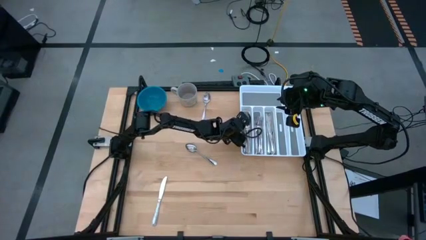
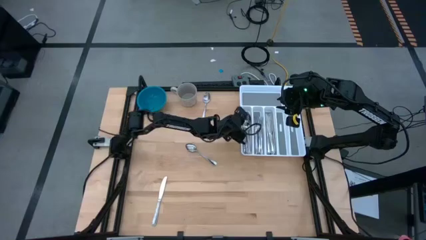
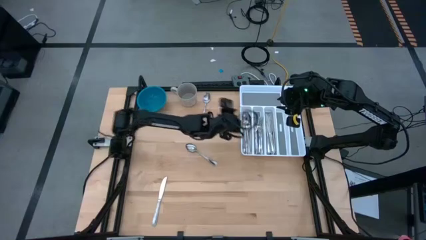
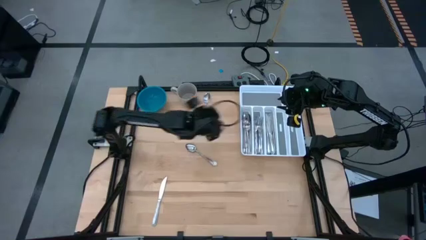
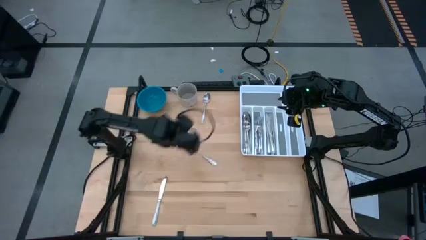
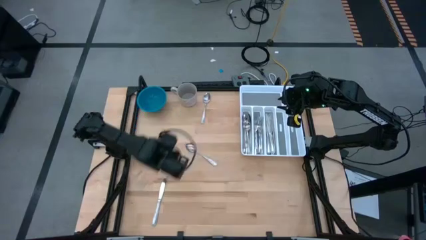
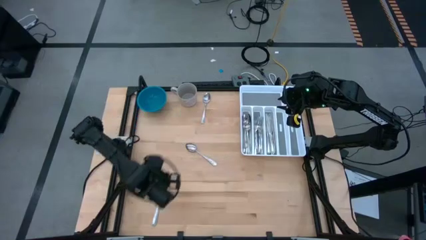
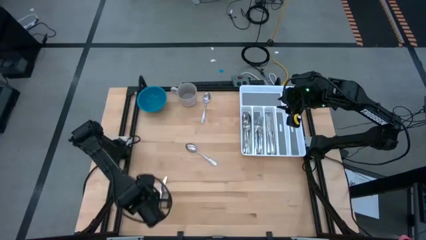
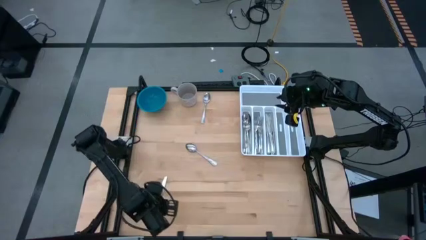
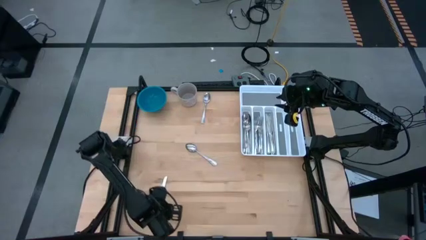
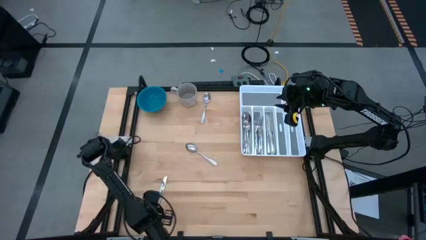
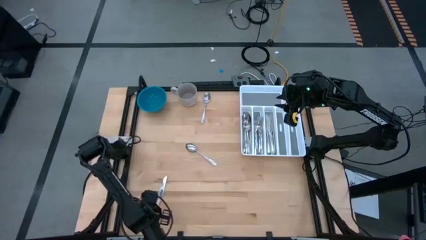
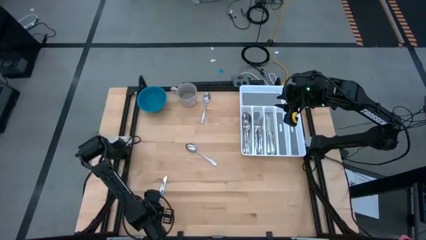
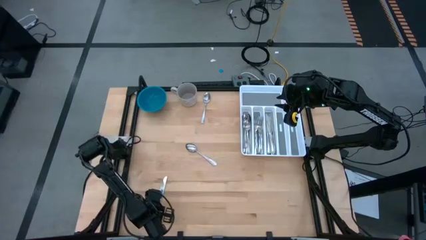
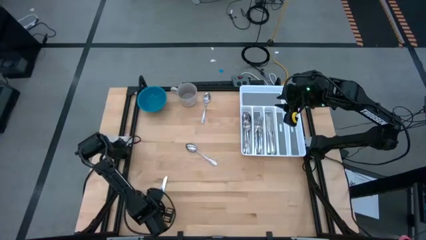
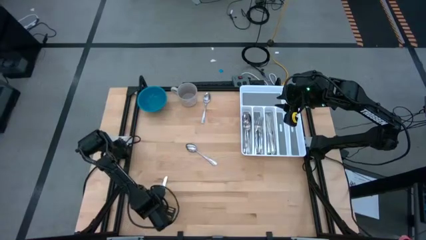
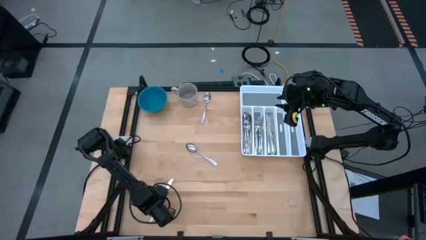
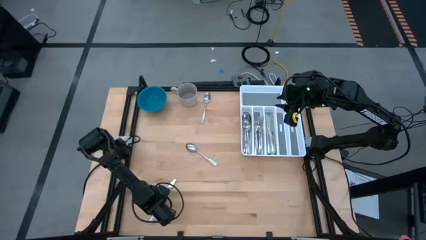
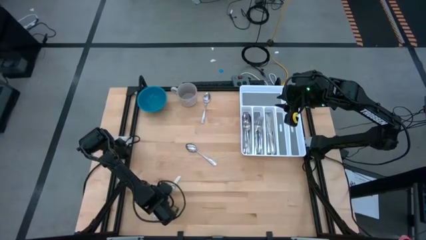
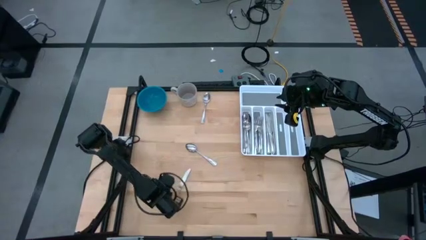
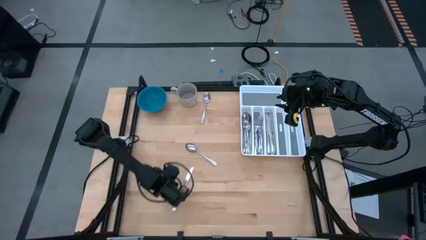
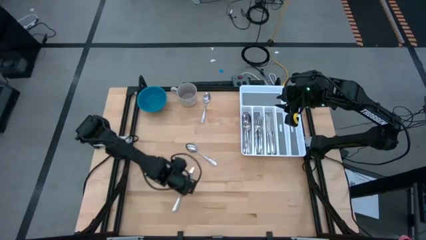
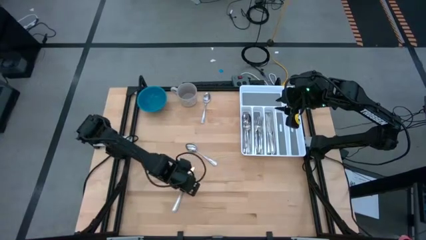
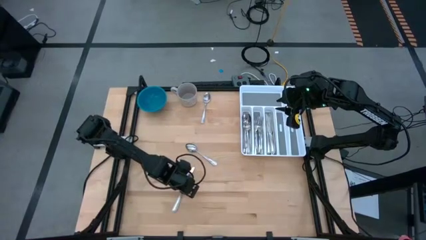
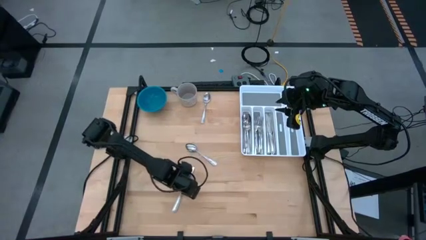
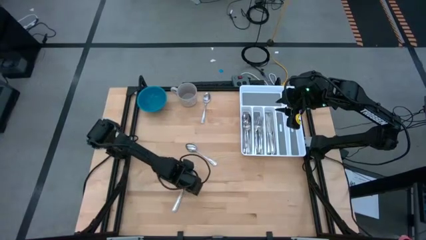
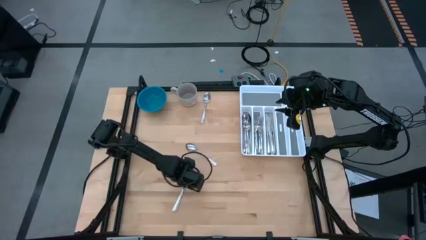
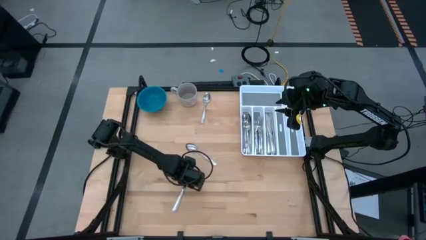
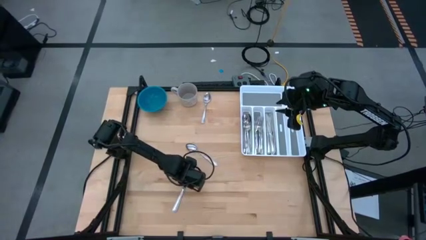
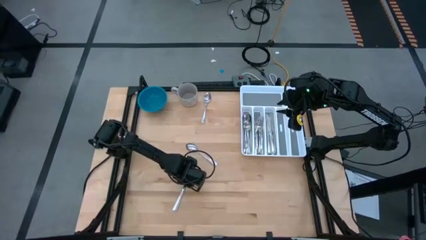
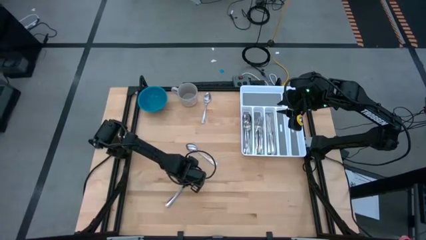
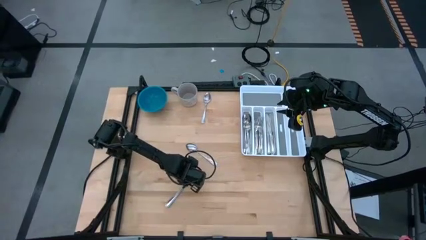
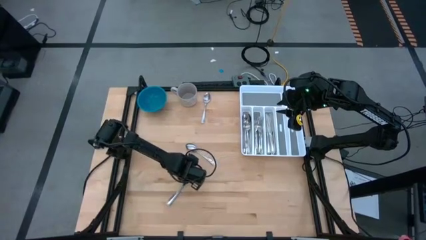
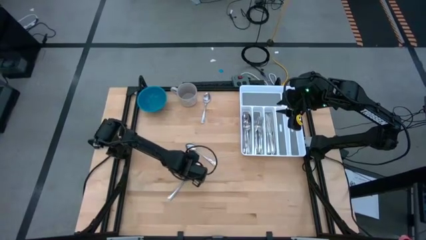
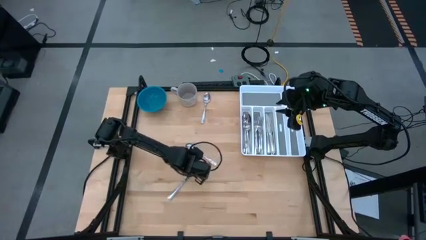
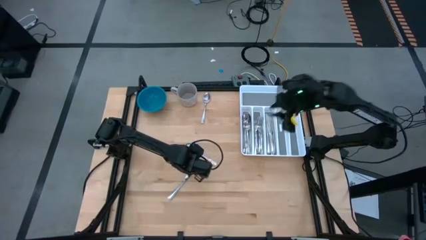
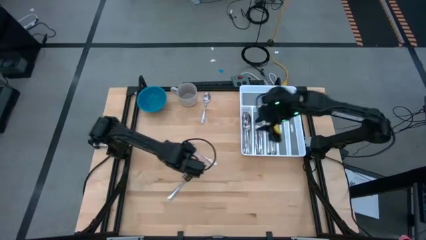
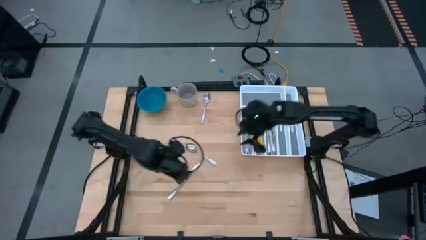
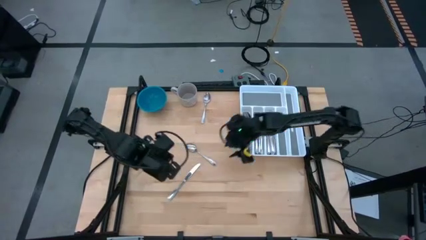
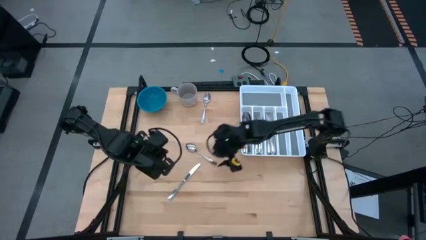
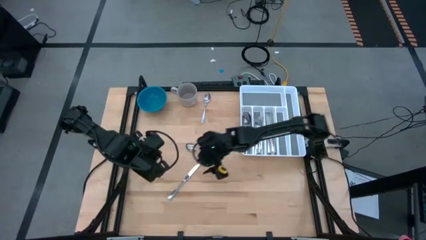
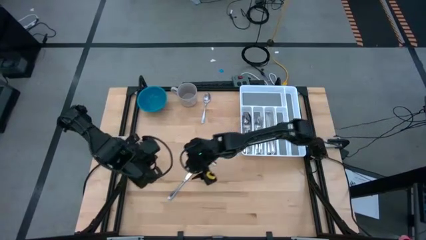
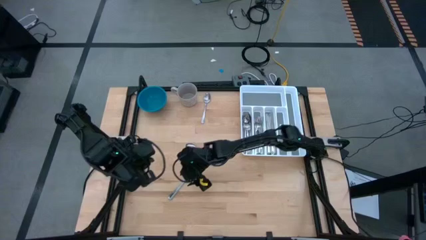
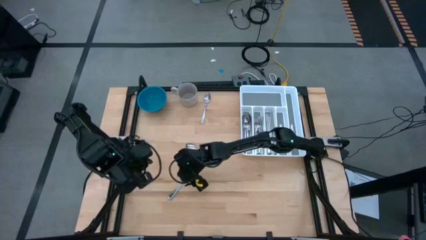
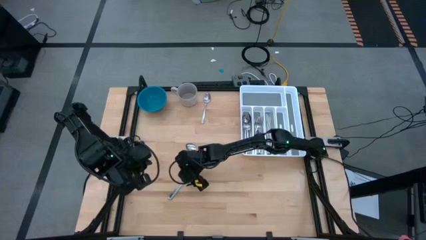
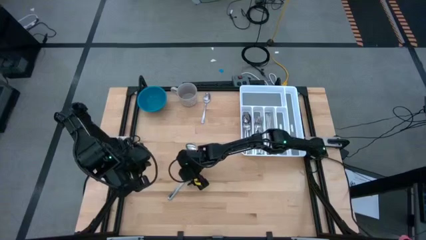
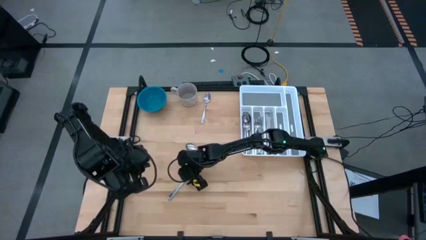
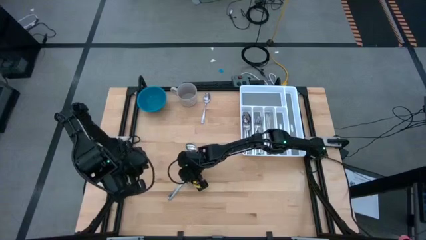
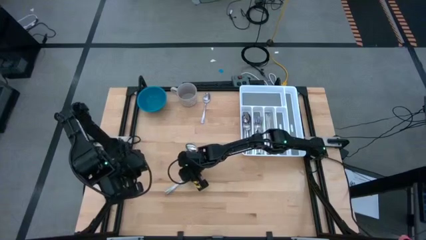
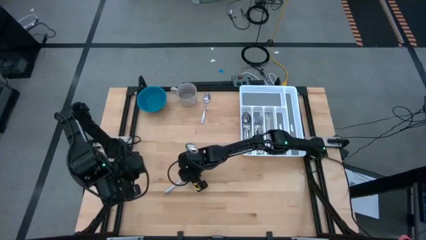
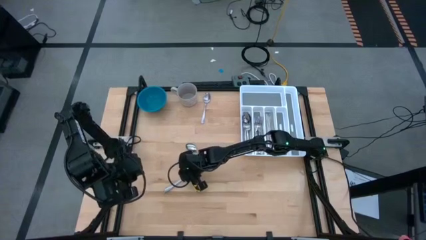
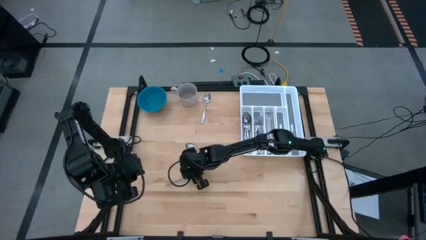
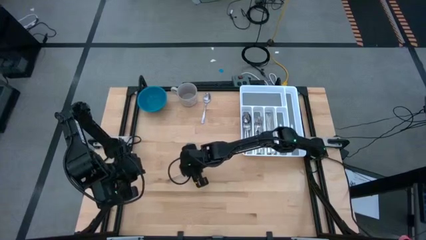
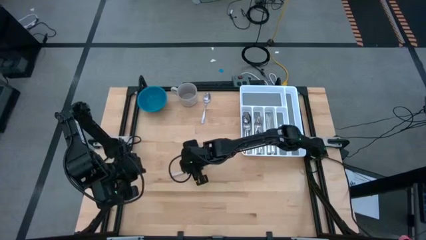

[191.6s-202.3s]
Task: Sort silverware
Put the table knife in the silverware tray

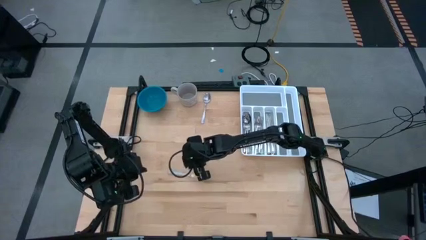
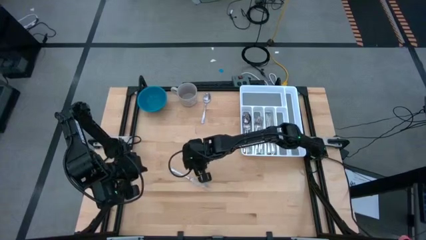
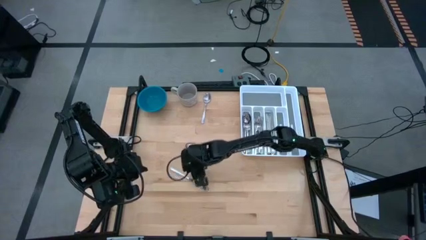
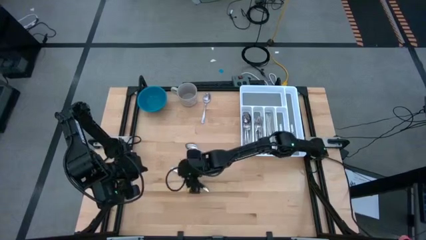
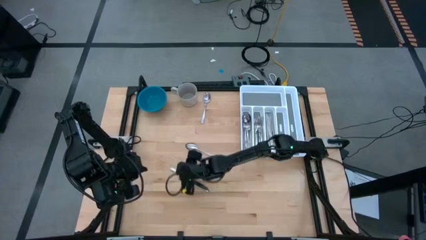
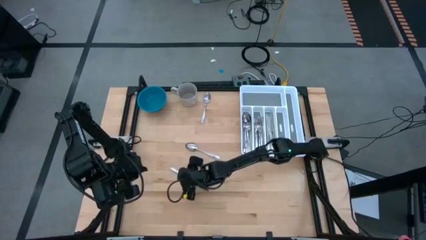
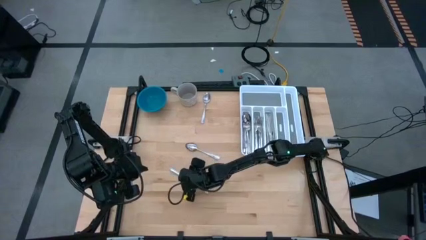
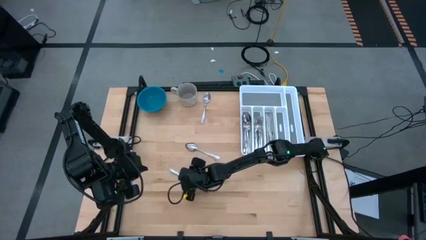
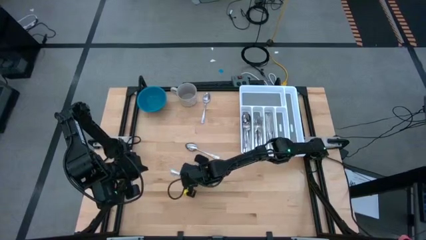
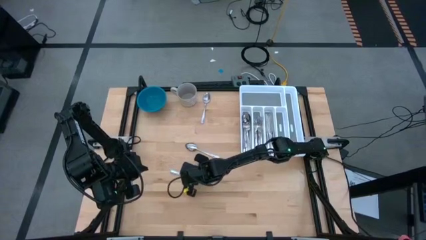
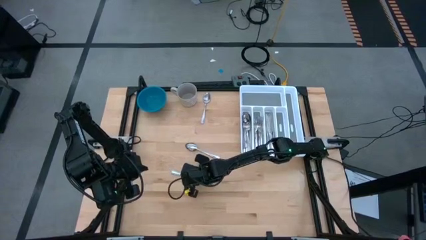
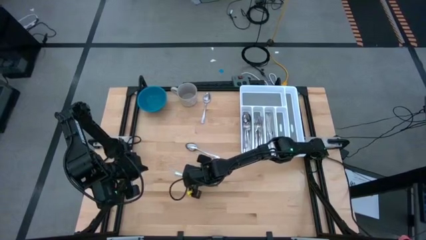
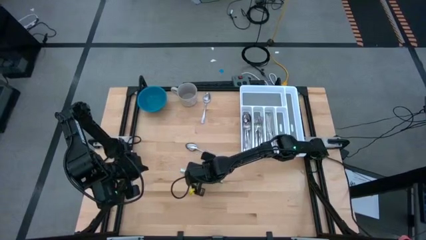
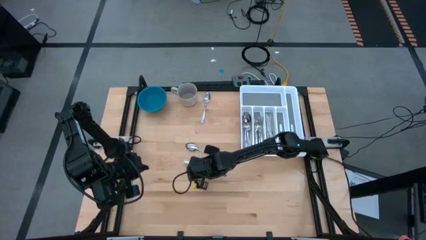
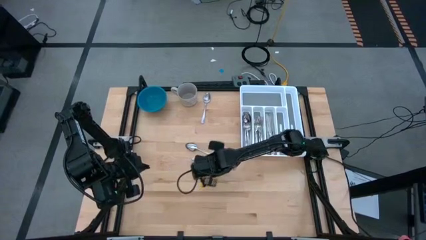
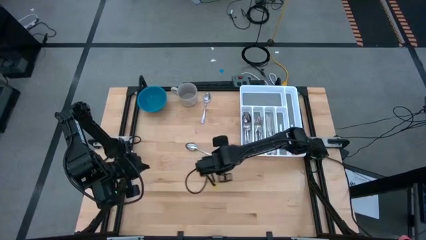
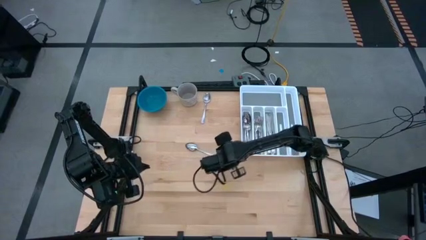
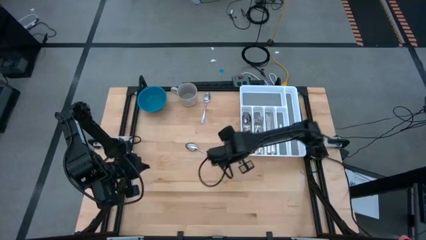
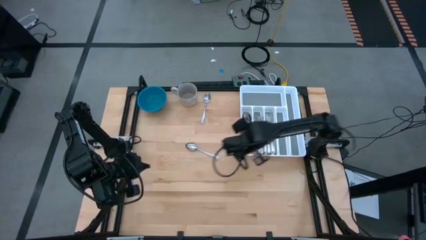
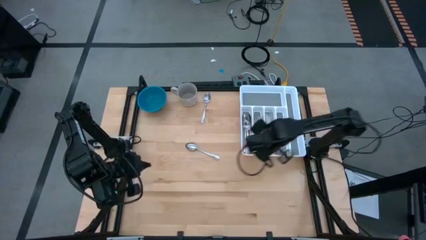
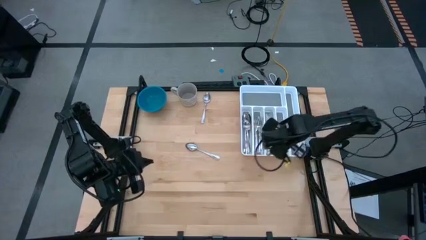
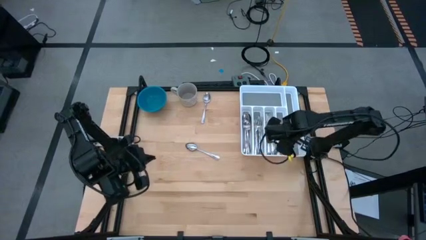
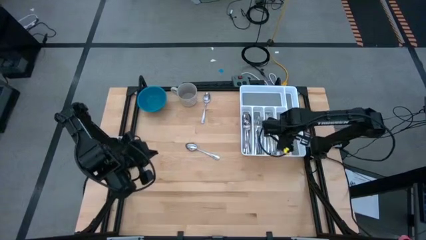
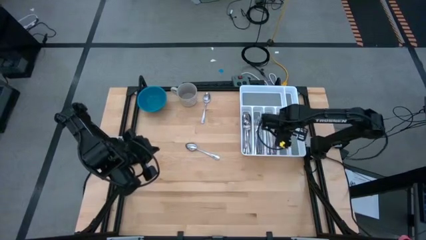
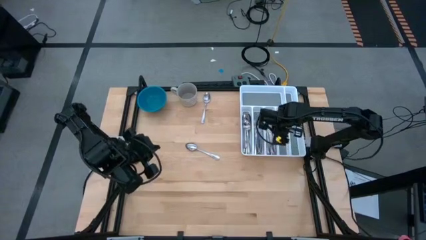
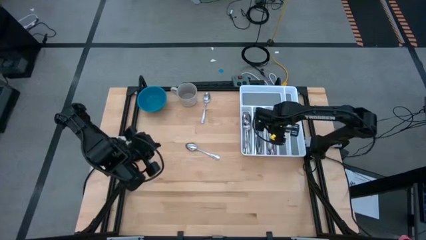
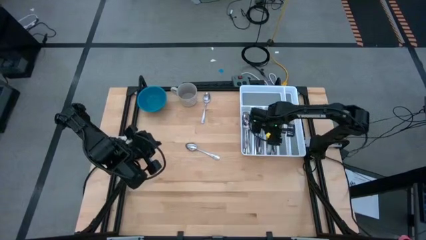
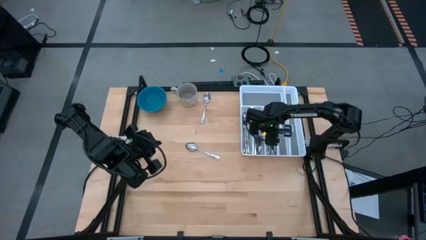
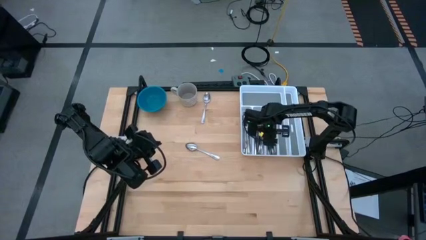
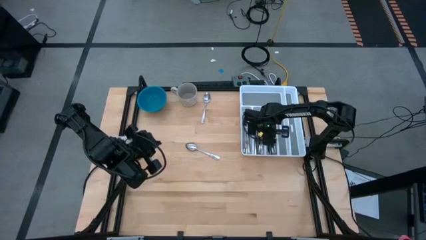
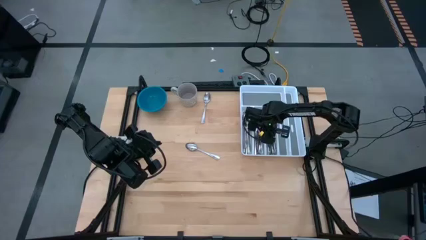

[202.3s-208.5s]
Put the table knife in the silverware tray
